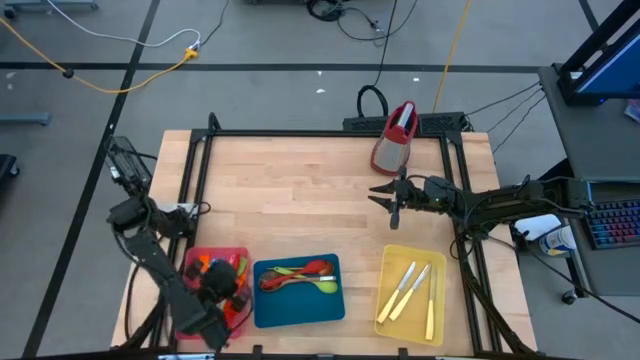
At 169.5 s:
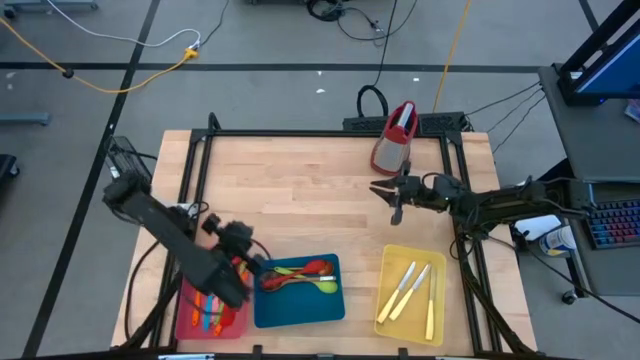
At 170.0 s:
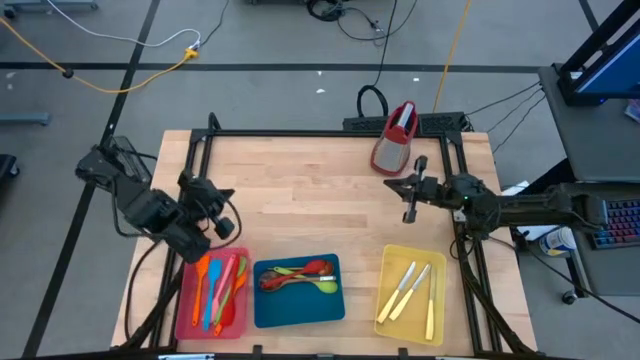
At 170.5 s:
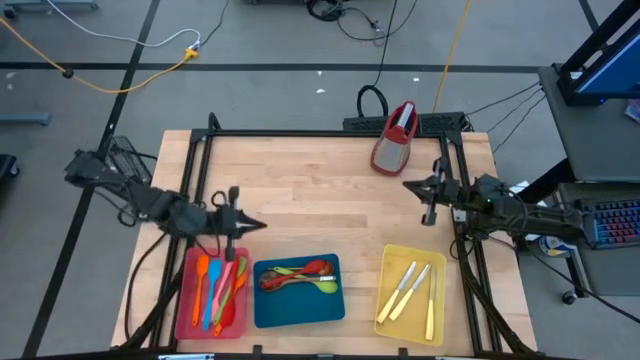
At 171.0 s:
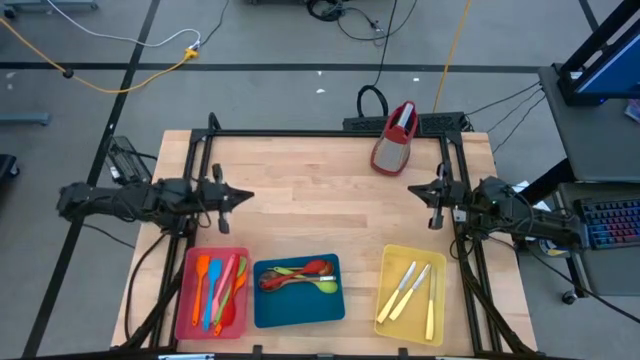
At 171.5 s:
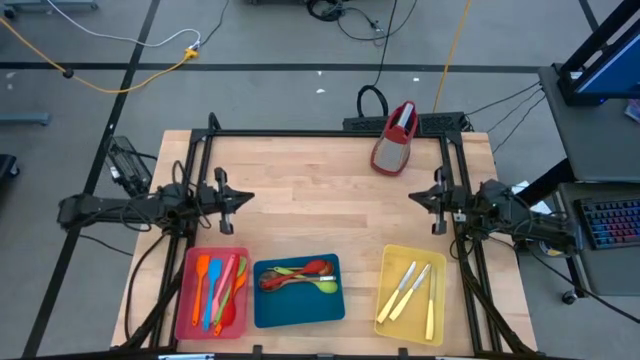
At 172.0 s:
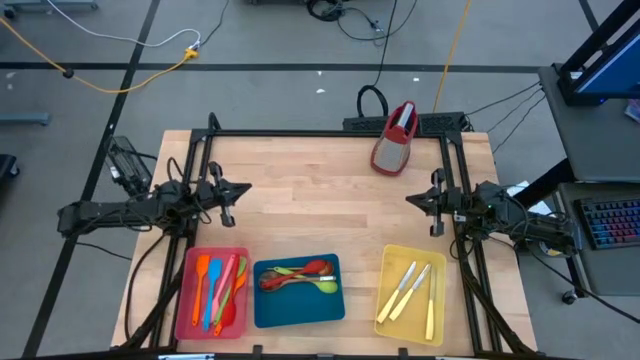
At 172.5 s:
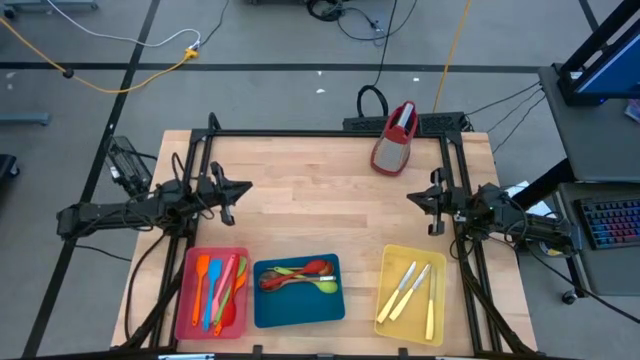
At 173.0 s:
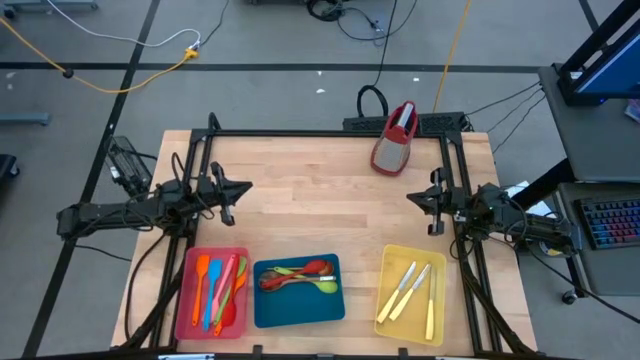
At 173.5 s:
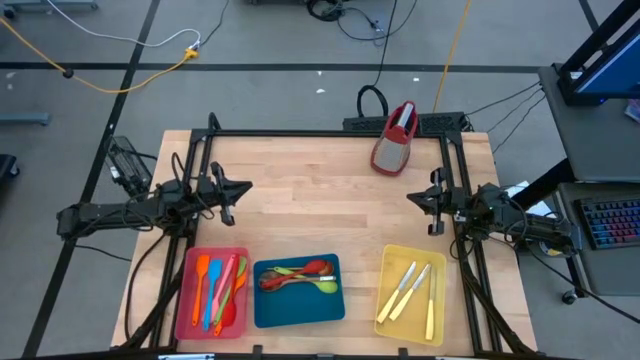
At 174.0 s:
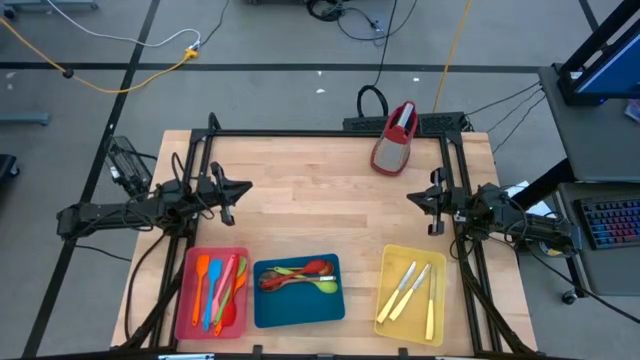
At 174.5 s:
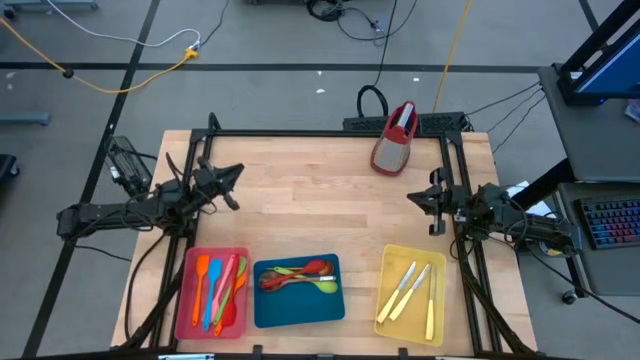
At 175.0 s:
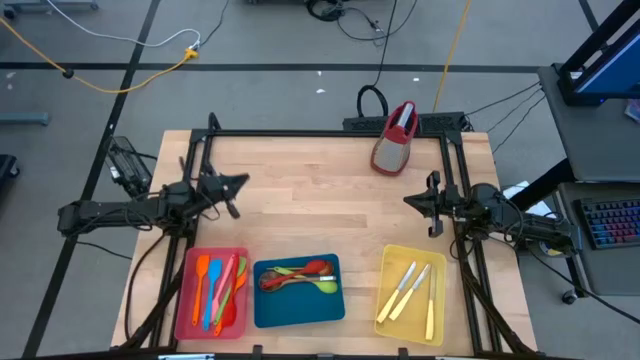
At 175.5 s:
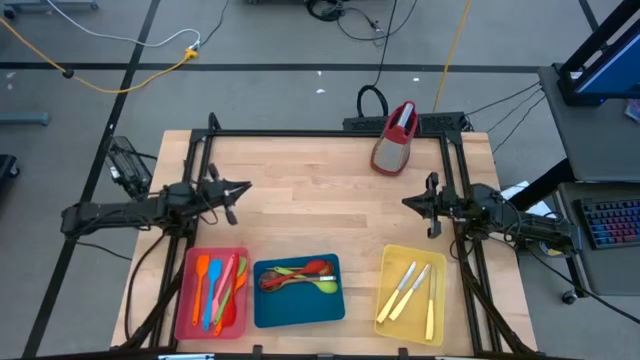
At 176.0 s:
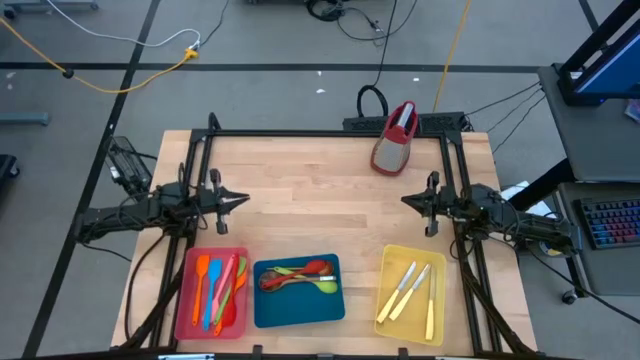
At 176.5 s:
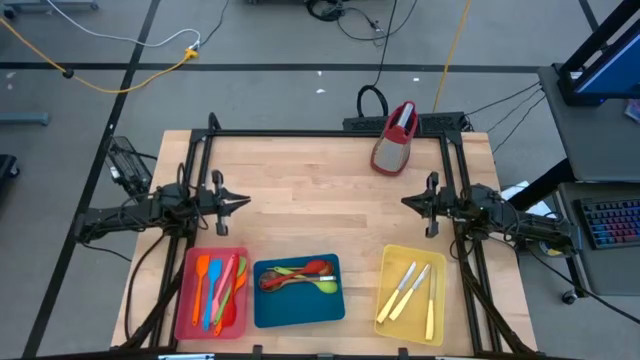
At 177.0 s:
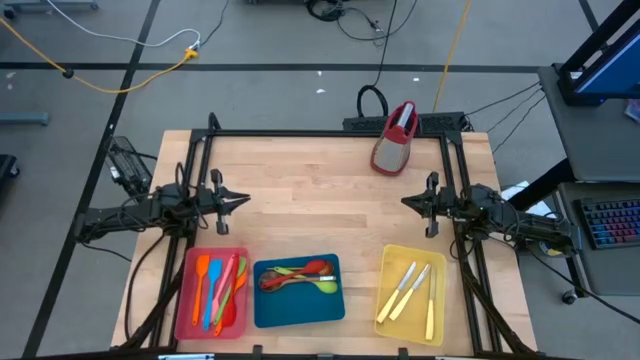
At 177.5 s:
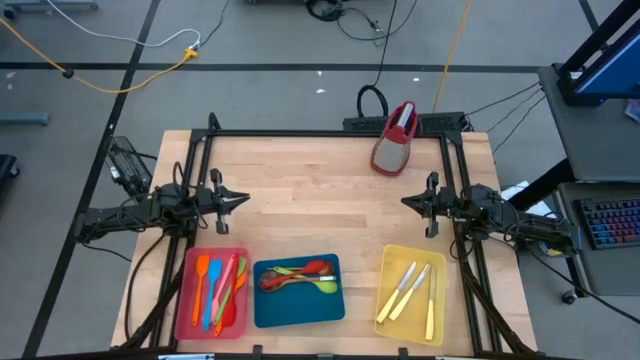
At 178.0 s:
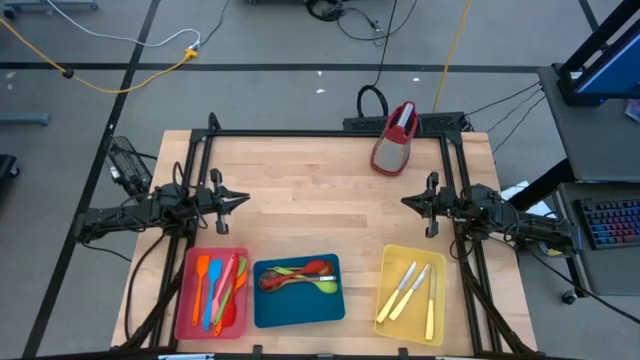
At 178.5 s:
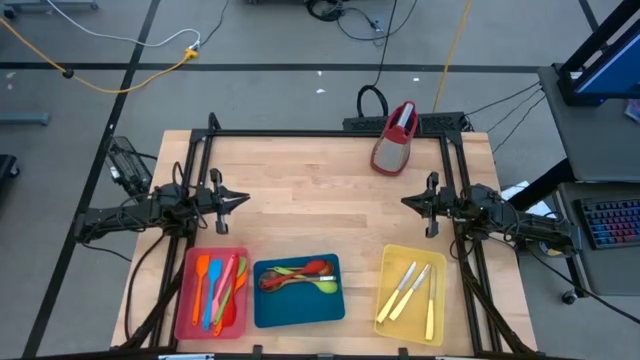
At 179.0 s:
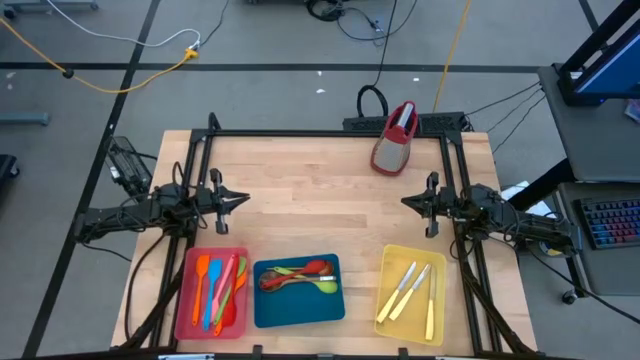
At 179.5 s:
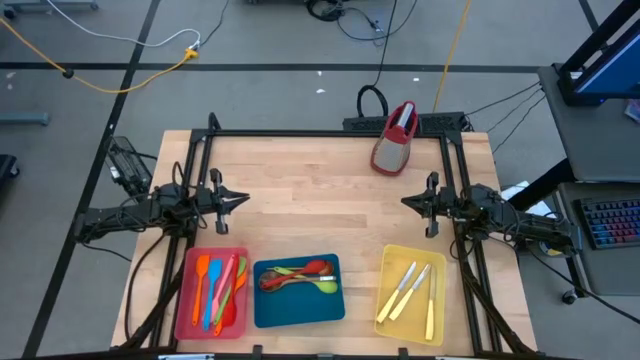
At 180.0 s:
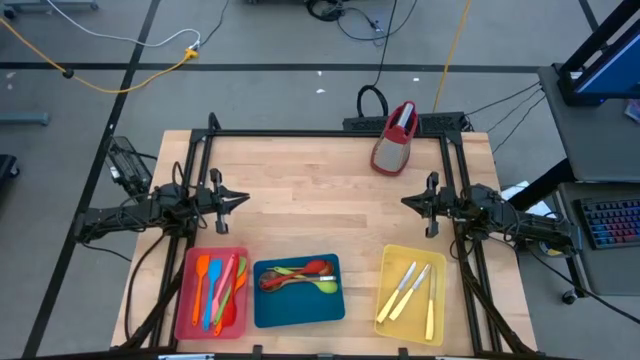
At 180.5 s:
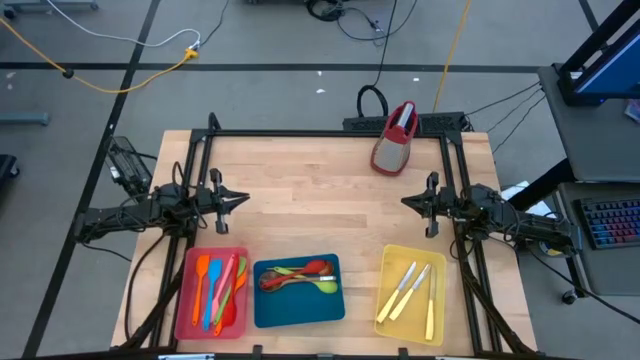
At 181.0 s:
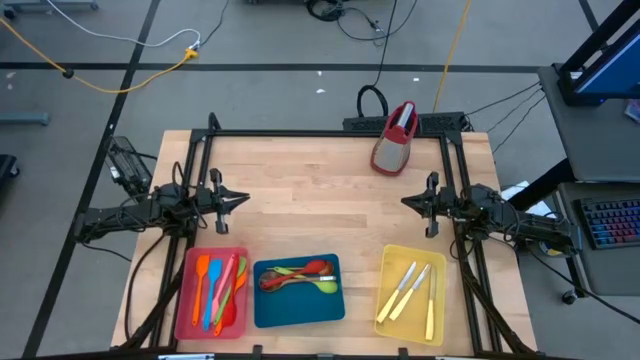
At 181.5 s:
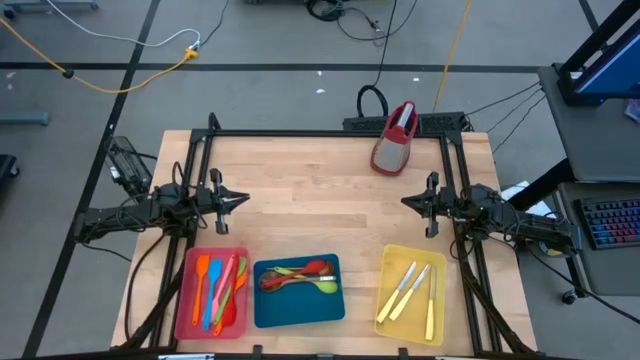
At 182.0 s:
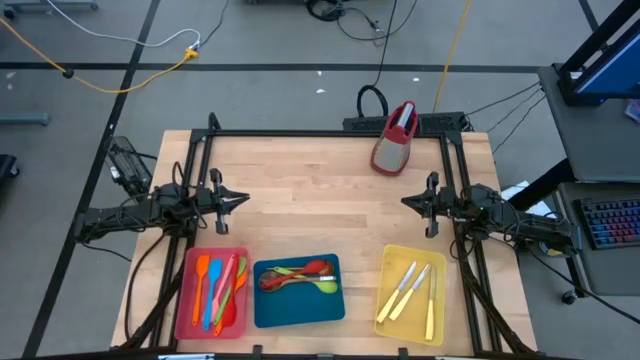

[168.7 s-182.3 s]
Task: Pick & Place Kitchen Items
Return to Home Position

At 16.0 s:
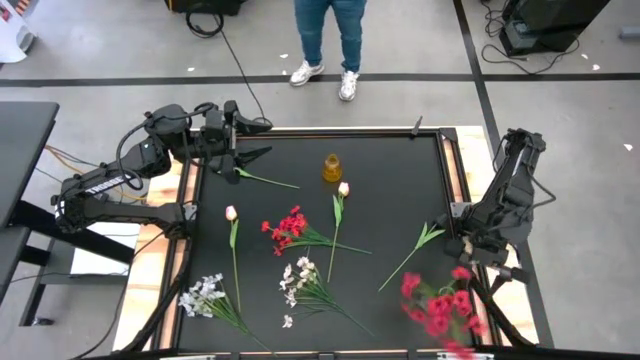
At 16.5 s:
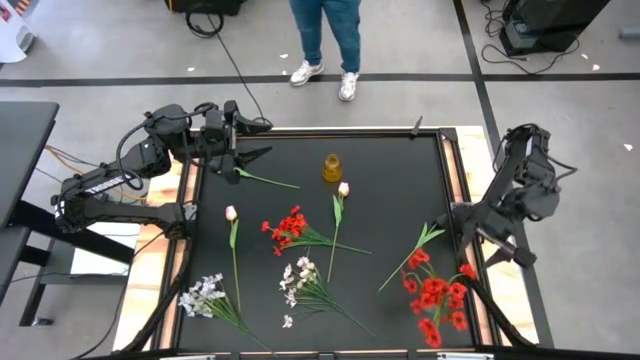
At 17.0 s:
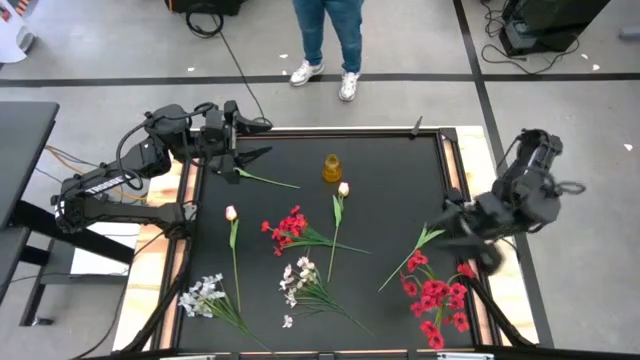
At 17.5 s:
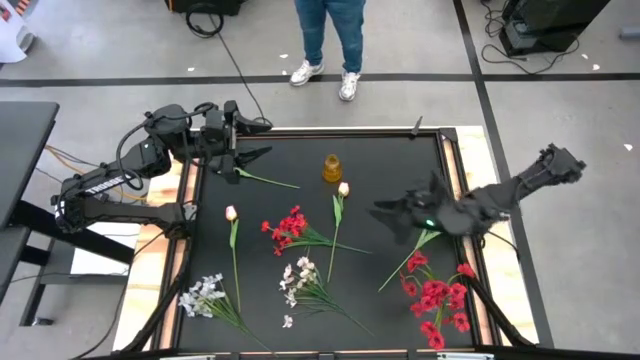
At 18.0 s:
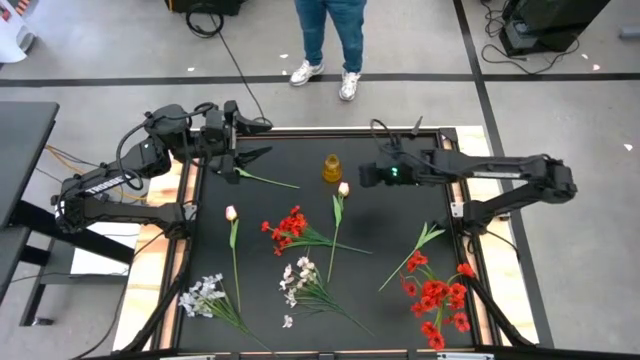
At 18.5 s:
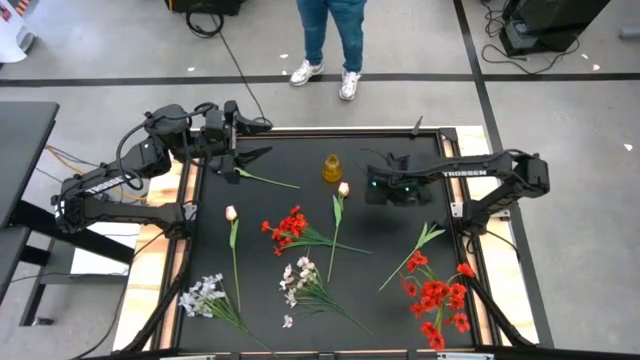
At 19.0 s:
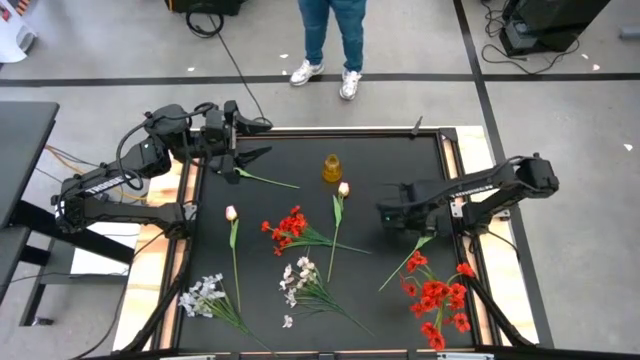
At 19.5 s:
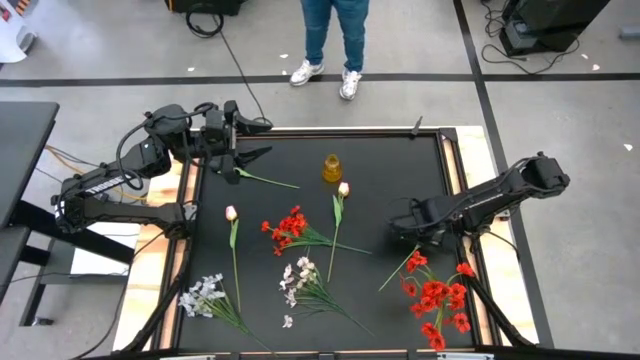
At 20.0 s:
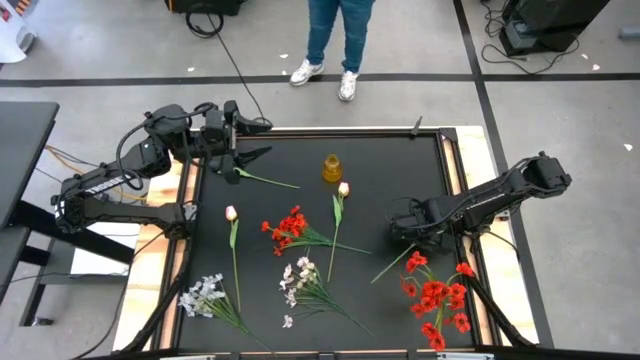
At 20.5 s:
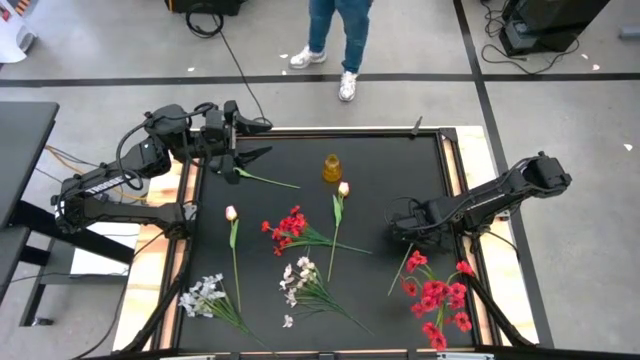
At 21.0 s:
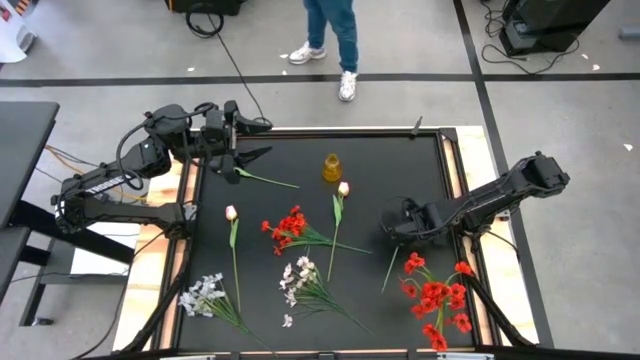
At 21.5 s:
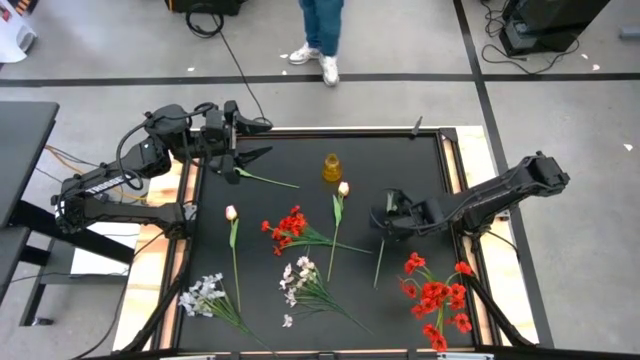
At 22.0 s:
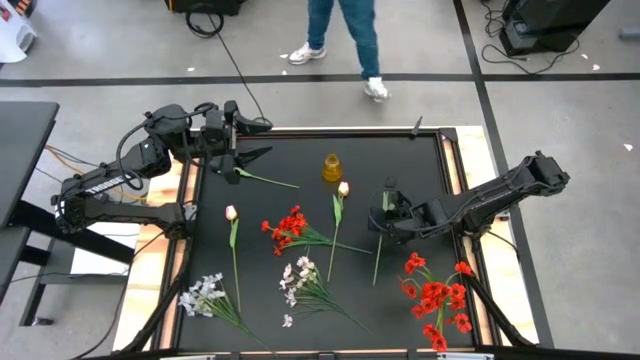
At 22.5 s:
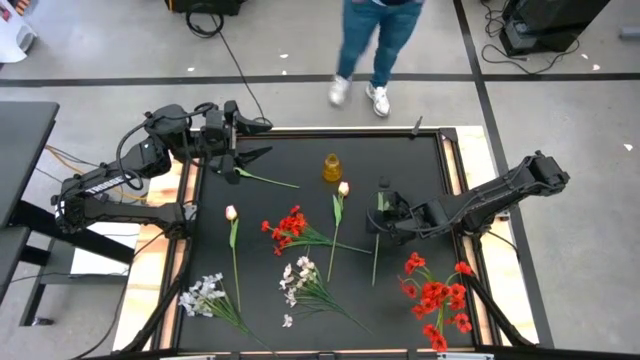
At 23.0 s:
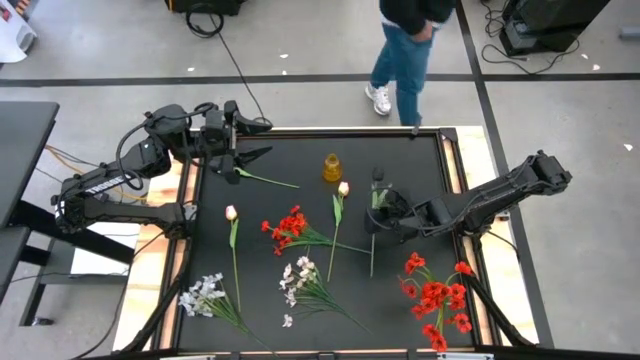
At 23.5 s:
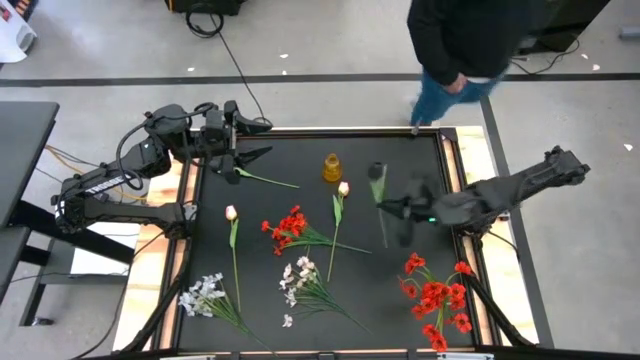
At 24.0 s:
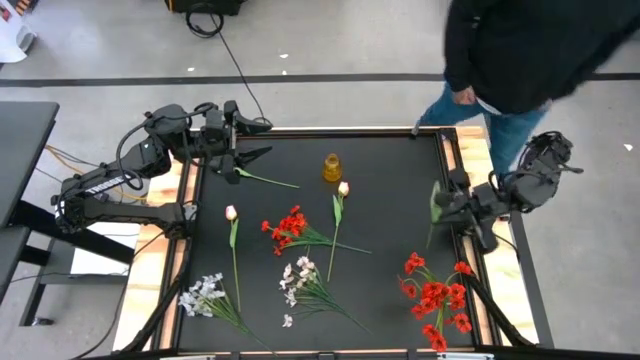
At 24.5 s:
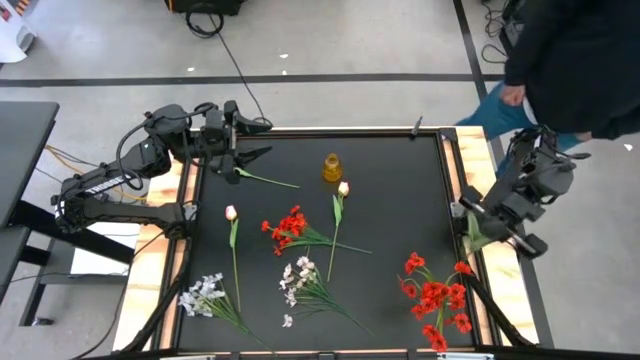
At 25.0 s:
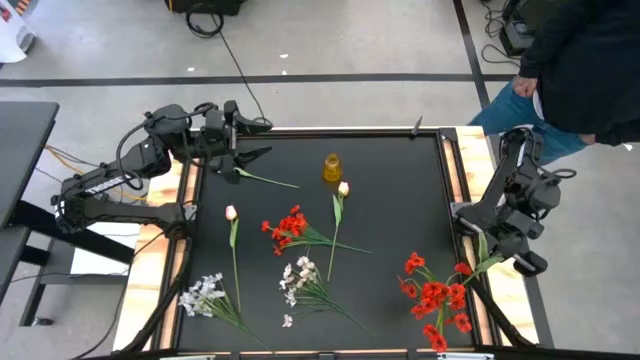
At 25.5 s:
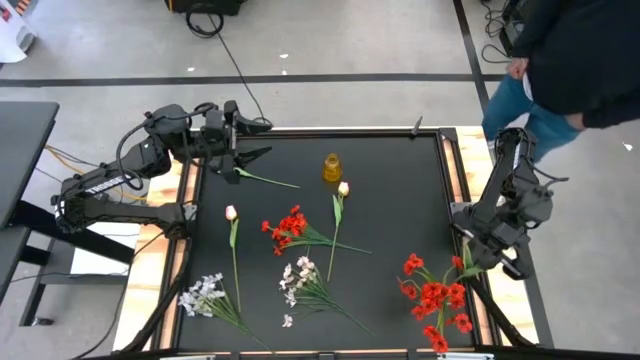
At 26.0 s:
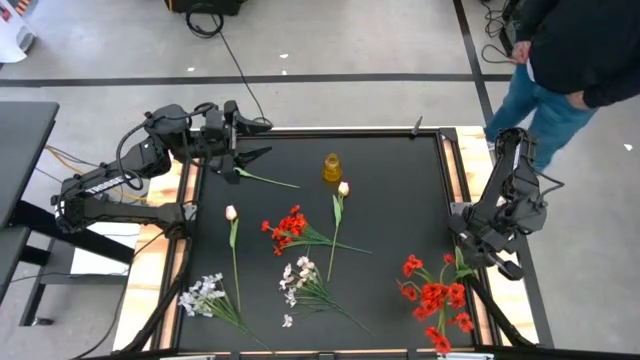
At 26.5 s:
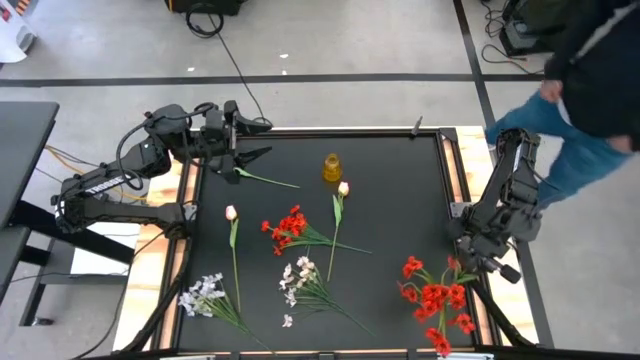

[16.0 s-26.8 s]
Task: Sort flowers into vase by color
Put the bottom black flower into the transparent vase
